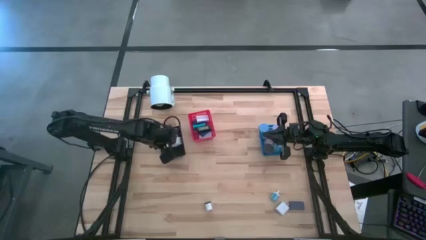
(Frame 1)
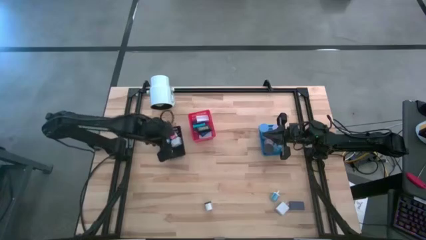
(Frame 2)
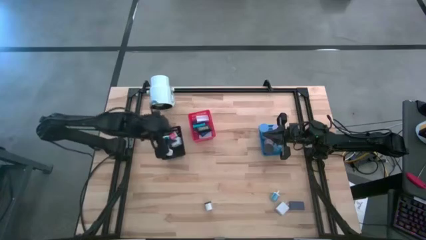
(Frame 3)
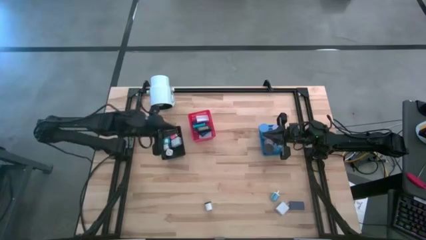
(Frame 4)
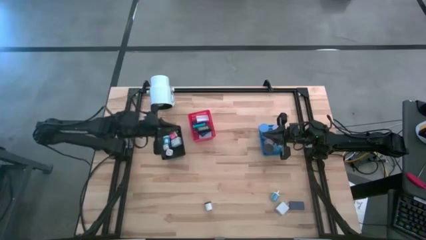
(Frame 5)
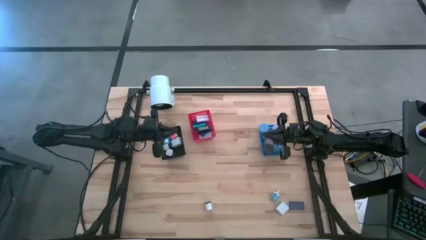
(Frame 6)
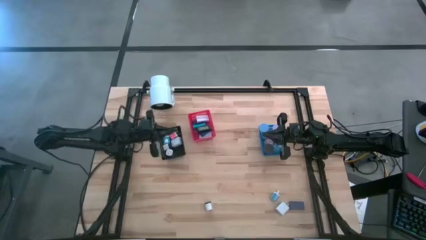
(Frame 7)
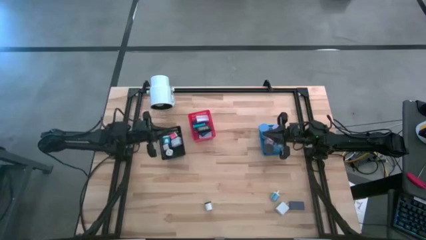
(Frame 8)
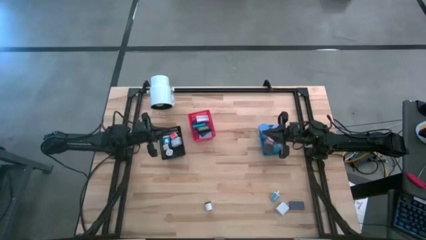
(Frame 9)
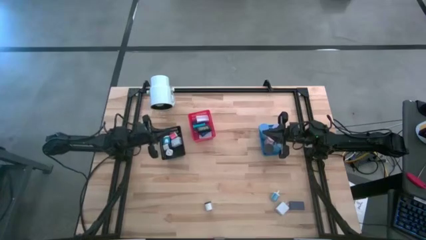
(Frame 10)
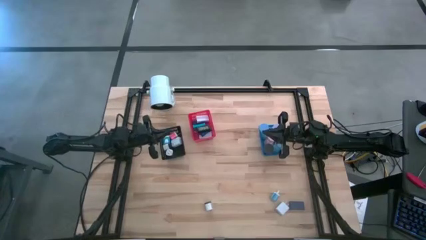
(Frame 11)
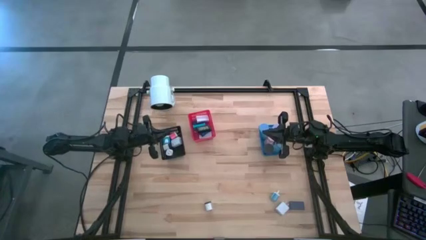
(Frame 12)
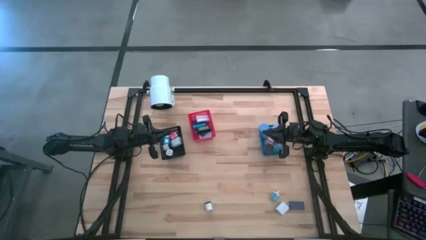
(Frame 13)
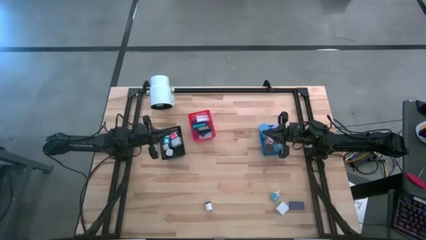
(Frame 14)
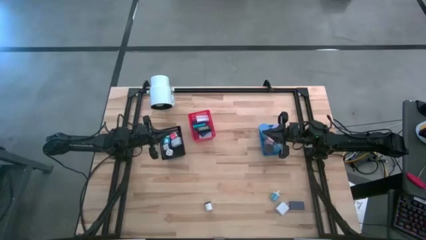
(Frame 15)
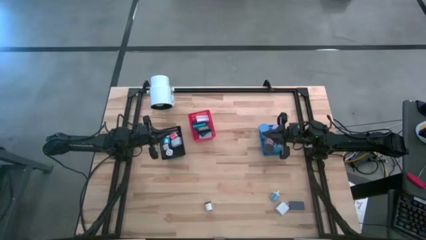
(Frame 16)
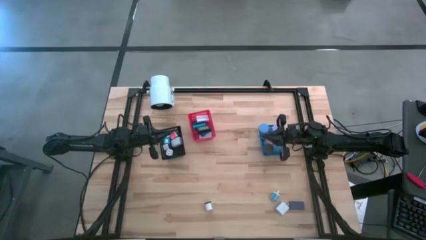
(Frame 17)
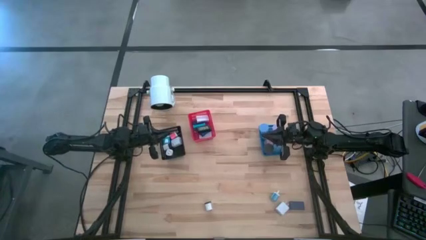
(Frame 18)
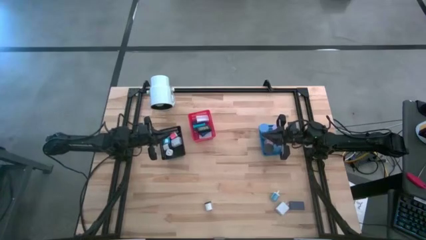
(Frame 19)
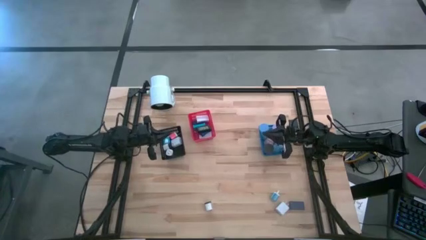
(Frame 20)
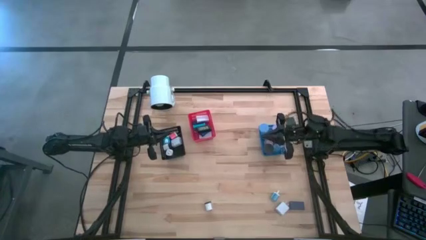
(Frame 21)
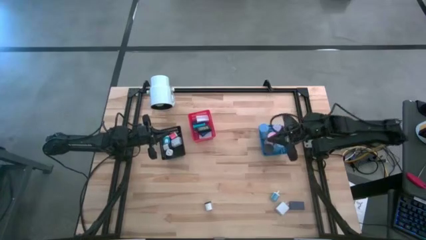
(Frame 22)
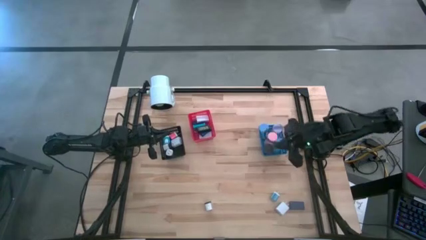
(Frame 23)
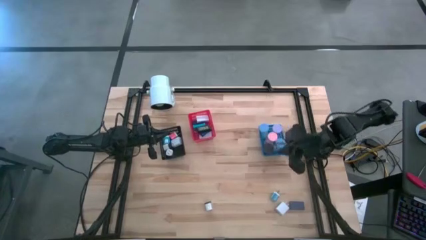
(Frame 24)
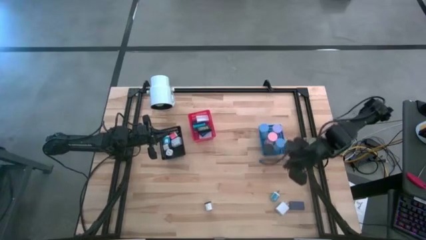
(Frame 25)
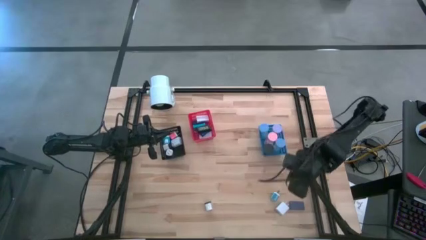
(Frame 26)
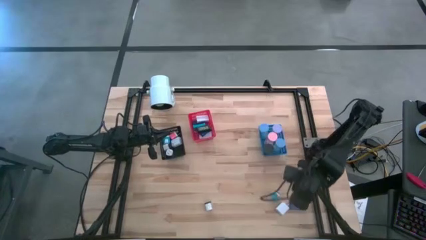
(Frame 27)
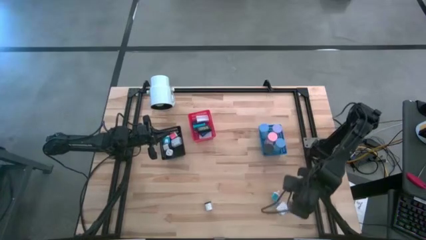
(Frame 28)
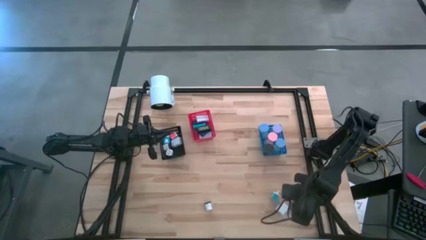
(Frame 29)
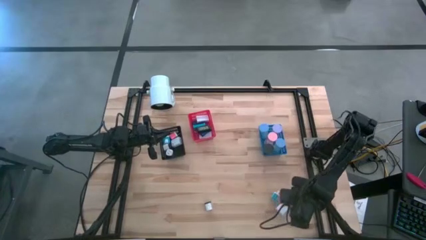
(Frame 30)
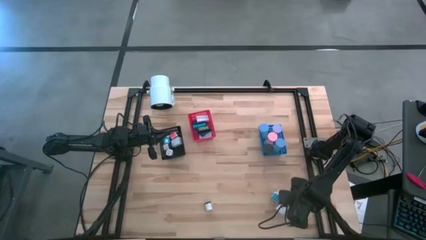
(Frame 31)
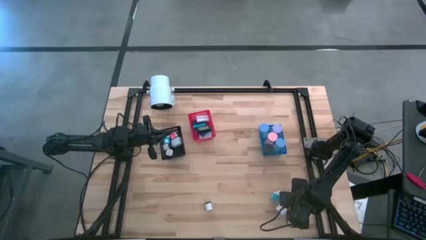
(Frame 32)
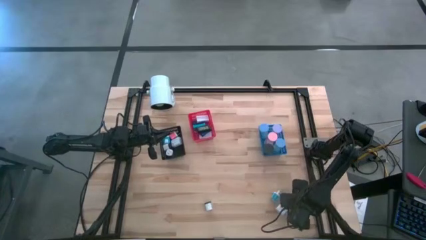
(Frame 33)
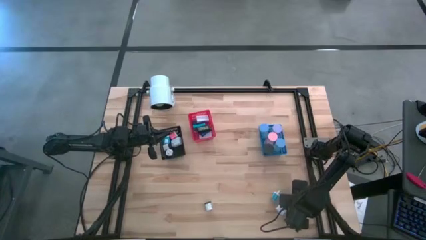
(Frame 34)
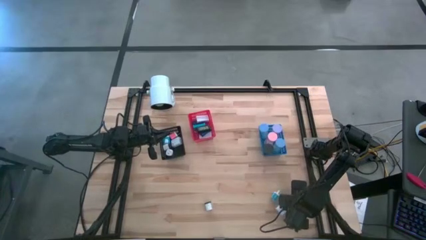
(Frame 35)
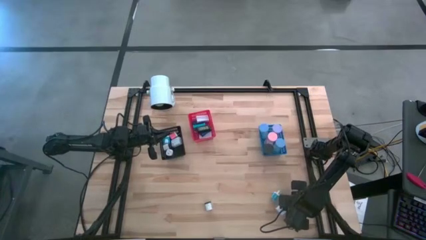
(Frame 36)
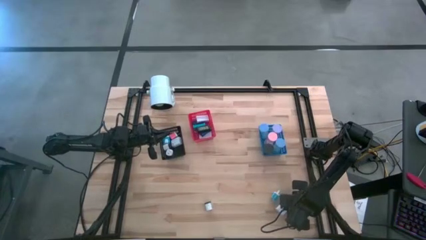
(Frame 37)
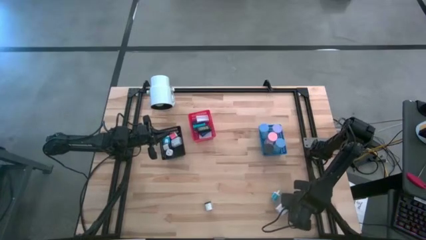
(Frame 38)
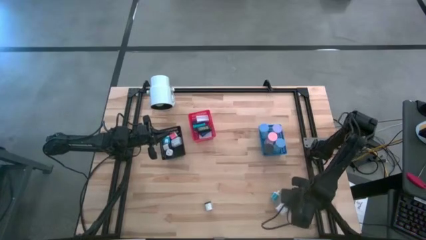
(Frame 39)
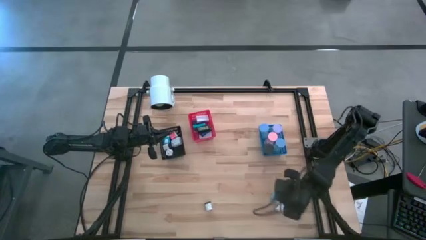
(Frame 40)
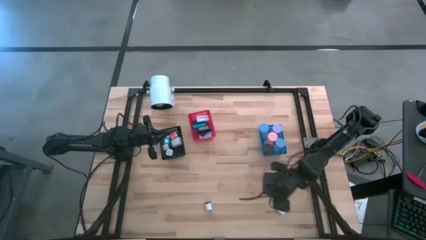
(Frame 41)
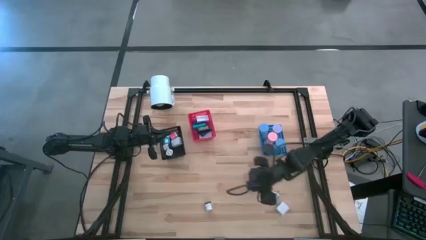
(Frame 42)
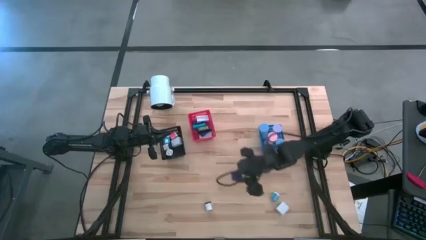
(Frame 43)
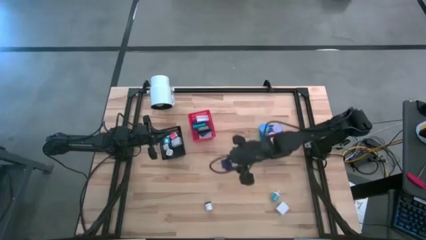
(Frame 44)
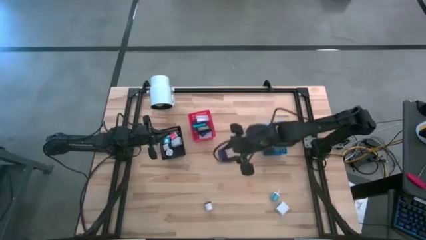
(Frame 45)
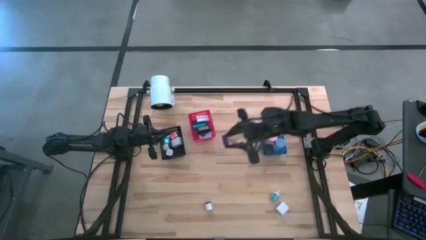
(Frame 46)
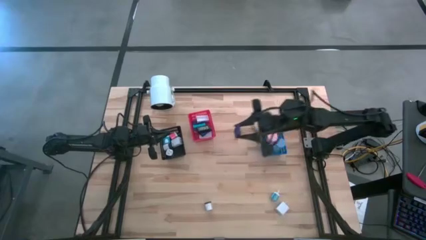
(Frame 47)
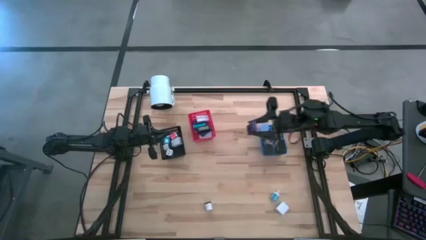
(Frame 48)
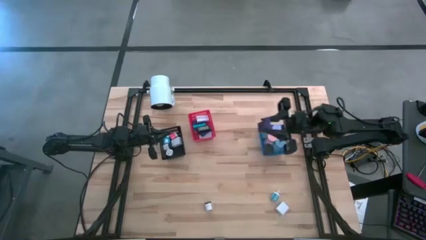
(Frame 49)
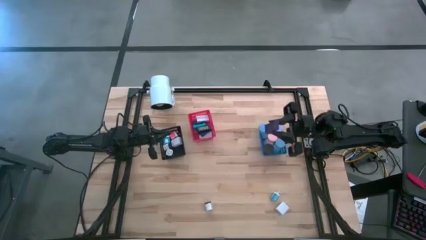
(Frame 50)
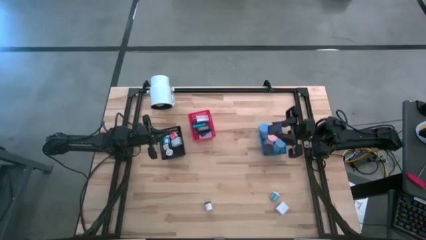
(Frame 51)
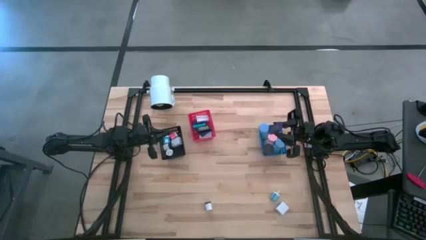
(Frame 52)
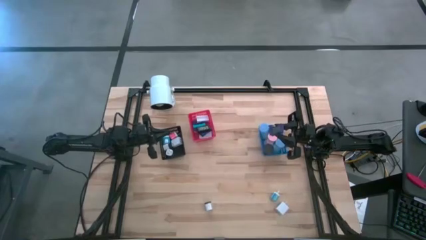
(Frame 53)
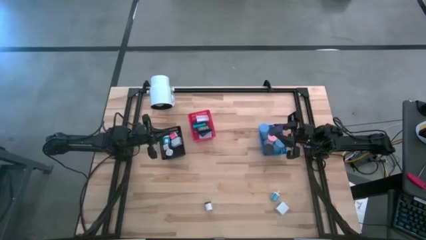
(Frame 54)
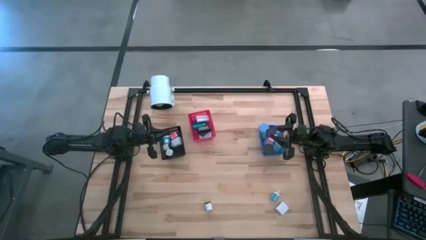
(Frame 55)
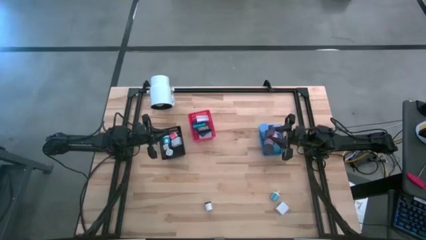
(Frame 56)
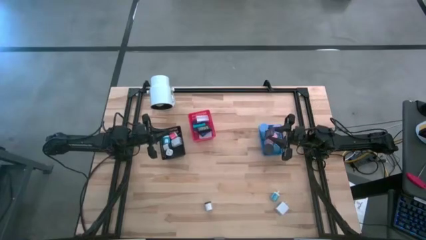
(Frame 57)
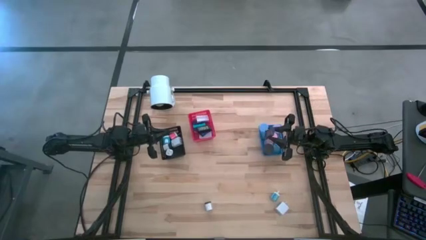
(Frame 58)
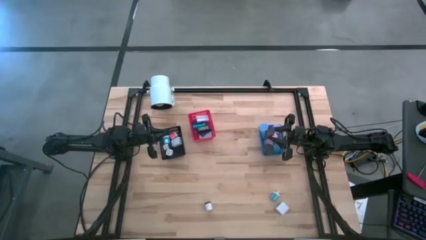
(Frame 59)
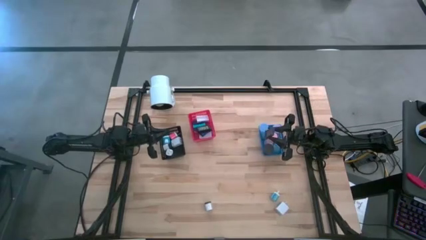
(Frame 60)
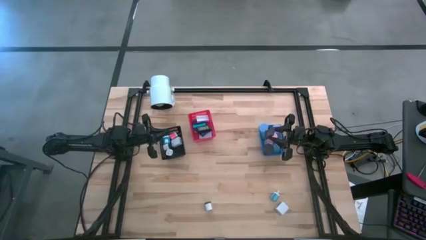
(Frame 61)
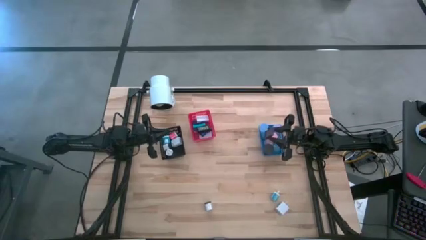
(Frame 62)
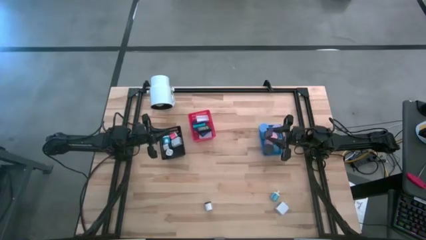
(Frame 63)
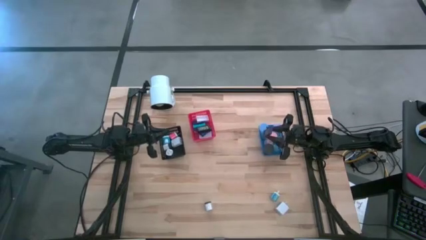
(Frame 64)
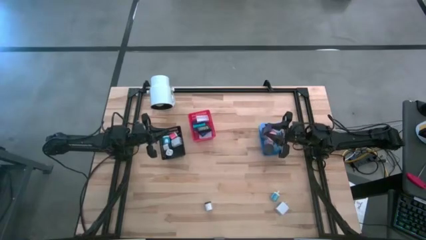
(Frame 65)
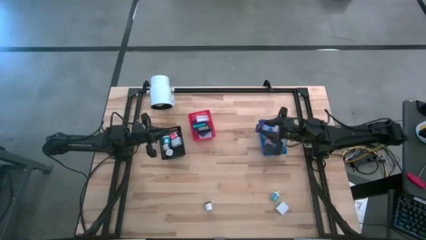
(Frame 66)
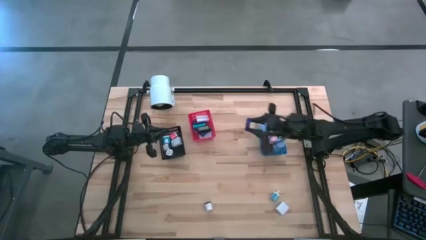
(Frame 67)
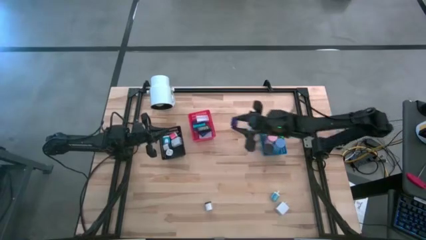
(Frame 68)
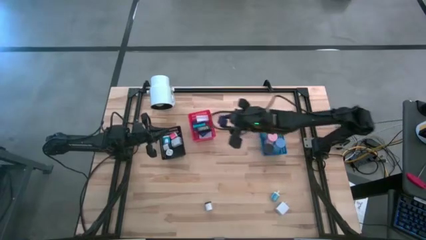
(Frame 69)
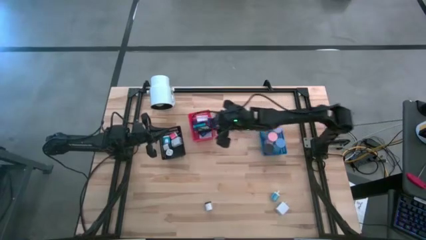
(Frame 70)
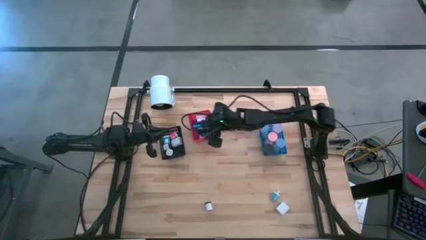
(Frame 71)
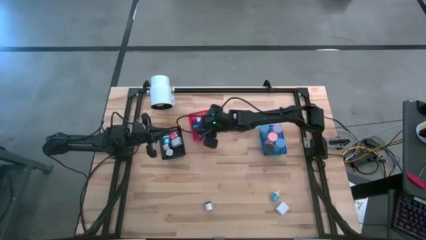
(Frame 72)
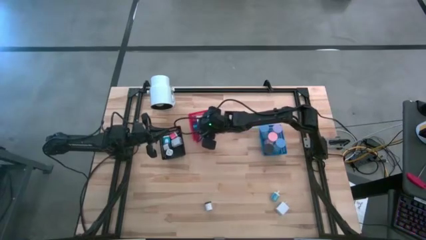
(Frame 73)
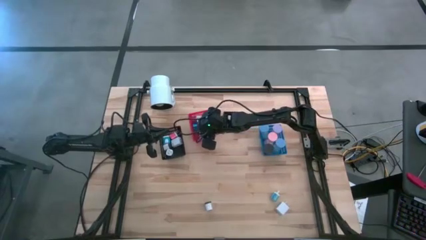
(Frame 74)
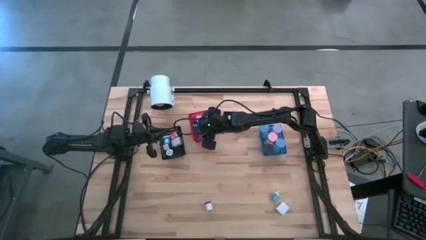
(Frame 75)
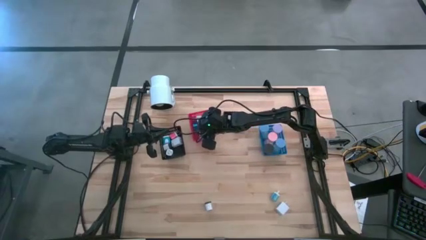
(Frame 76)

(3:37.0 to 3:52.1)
Task: Pick & Place Office items
Put the purple digital clock into the red bin

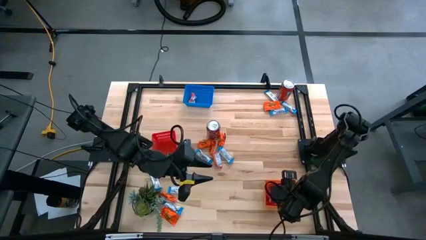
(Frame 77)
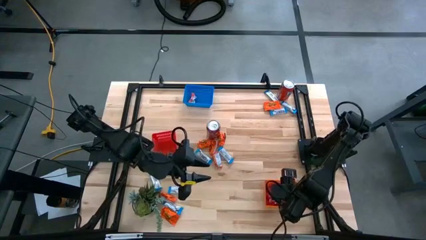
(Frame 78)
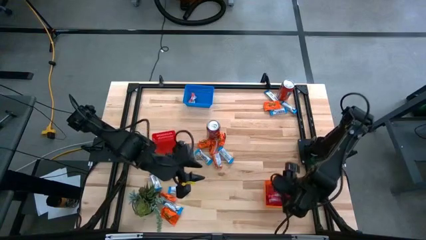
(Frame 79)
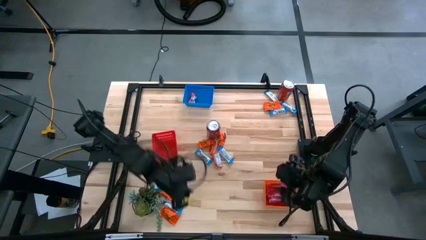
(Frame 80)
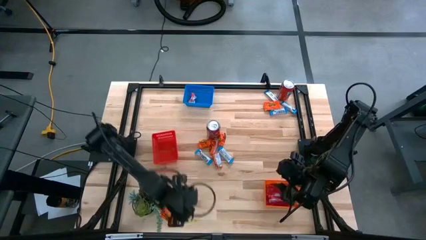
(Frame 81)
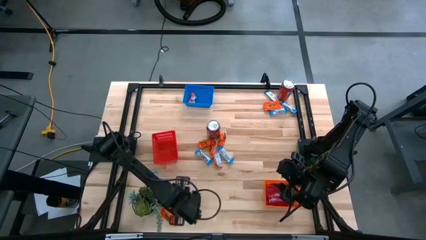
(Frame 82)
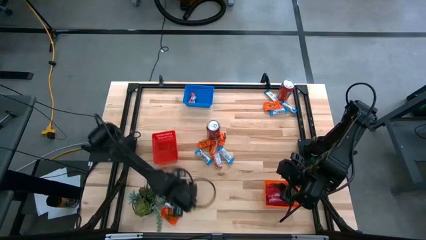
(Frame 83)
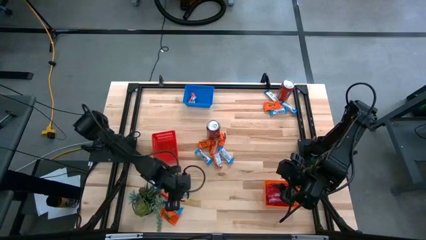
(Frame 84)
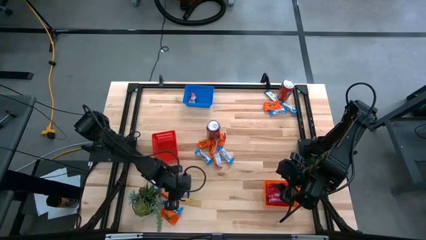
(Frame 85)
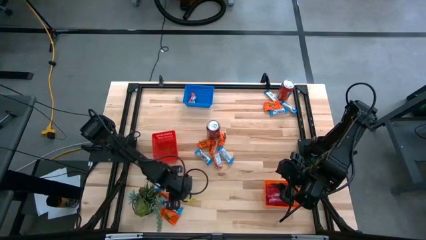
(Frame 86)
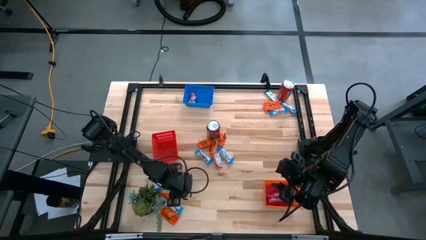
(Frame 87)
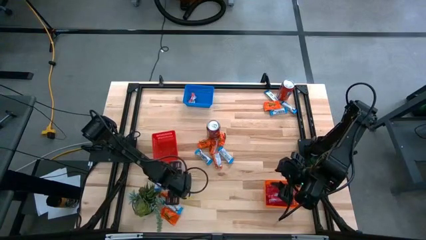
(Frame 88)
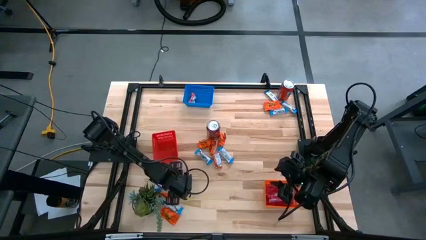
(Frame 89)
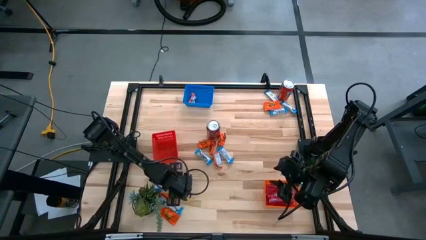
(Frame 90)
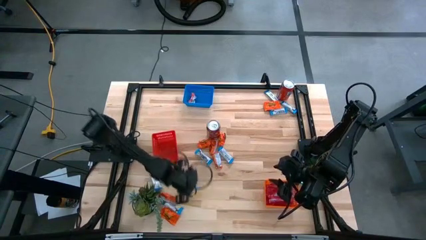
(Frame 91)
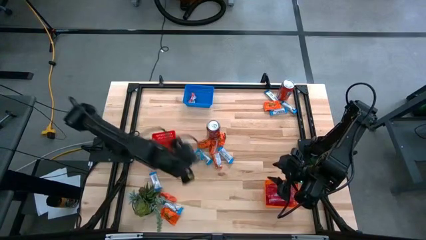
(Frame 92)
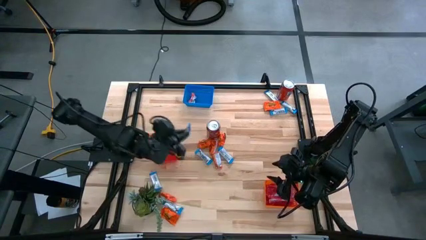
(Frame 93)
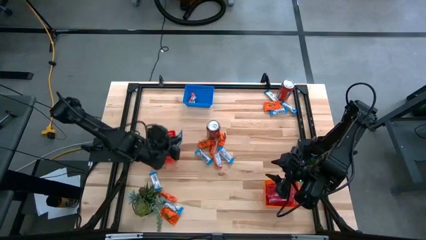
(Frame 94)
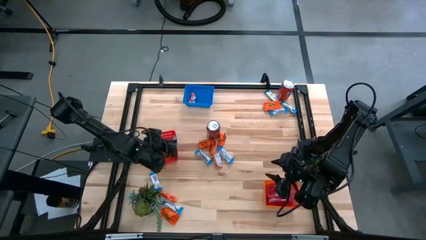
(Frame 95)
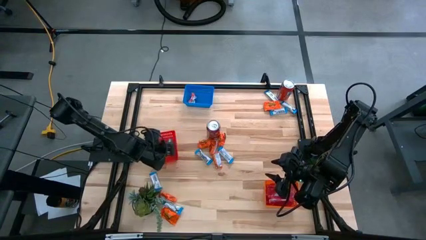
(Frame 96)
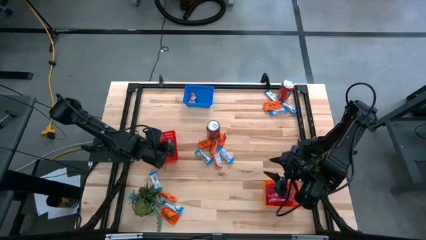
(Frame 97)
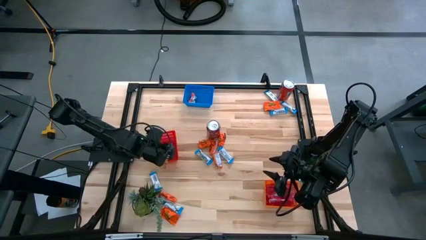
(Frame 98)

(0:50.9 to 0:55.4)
Task: Sort candy
Put the white chocolate into the red bin
